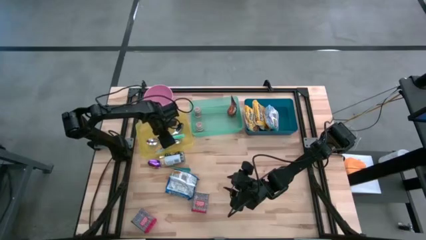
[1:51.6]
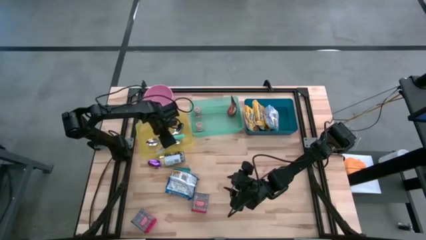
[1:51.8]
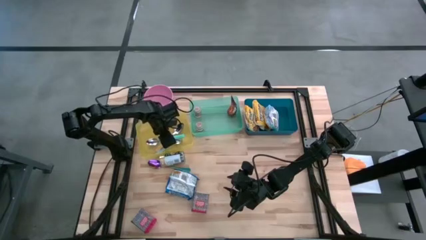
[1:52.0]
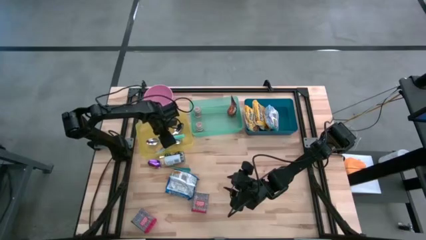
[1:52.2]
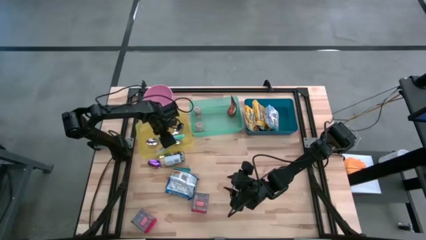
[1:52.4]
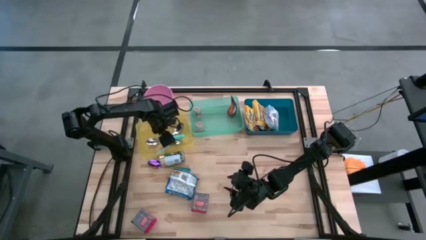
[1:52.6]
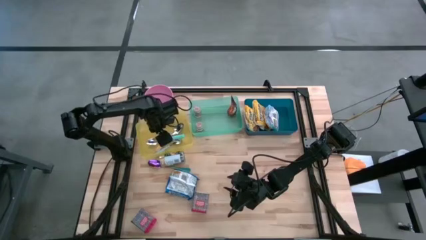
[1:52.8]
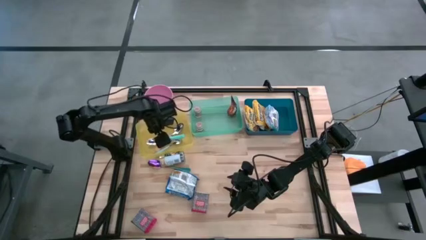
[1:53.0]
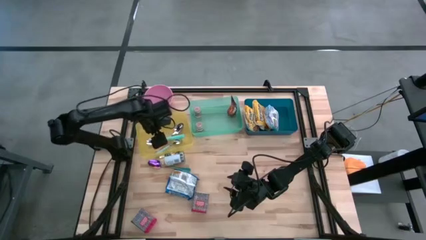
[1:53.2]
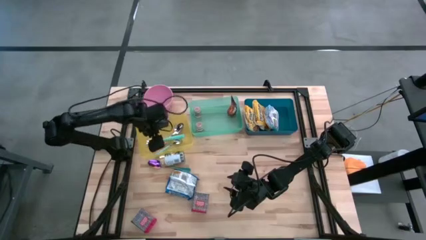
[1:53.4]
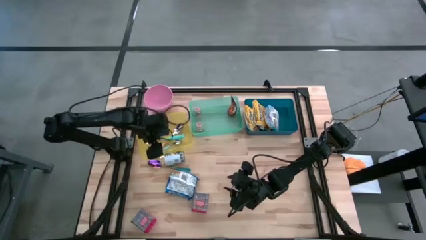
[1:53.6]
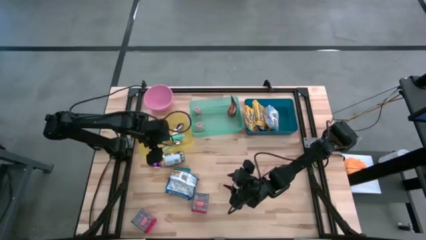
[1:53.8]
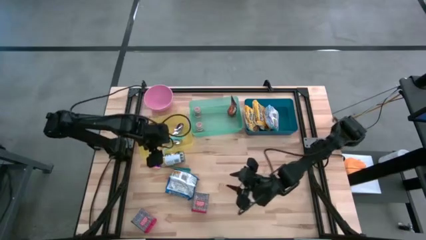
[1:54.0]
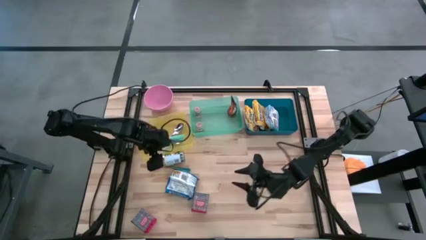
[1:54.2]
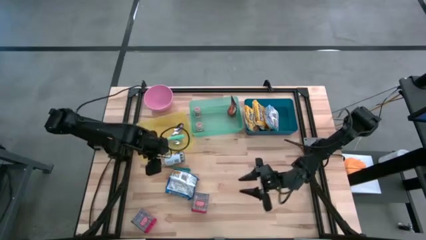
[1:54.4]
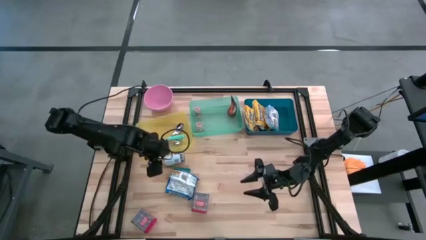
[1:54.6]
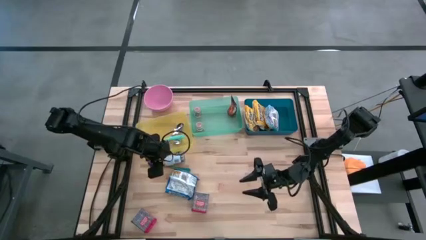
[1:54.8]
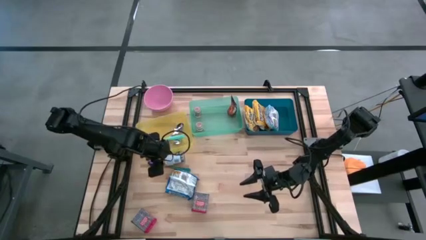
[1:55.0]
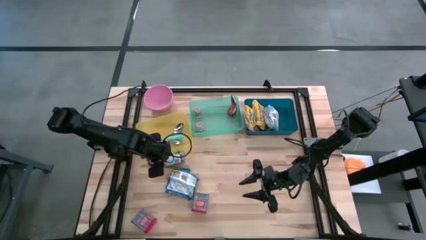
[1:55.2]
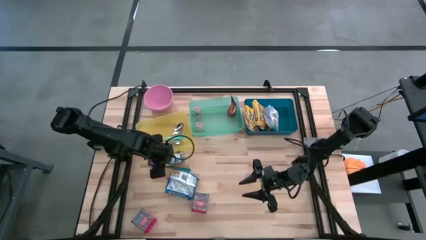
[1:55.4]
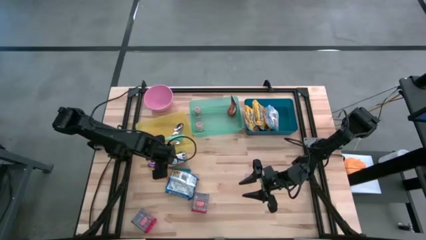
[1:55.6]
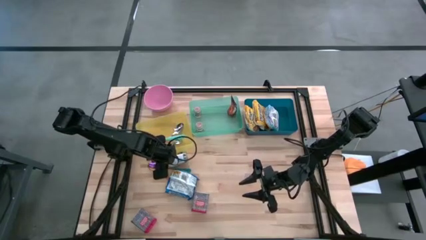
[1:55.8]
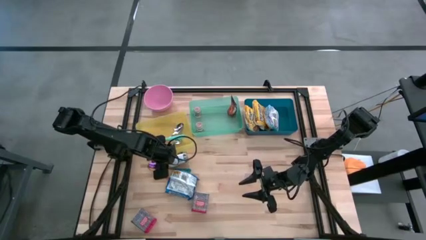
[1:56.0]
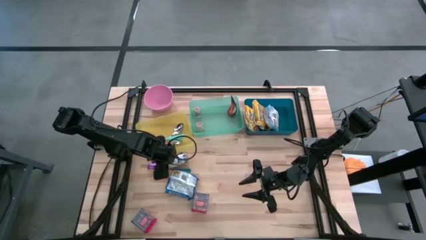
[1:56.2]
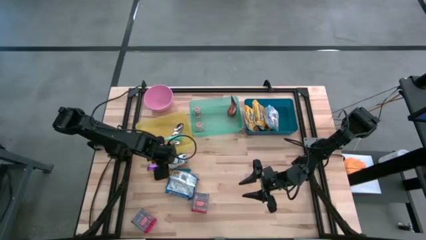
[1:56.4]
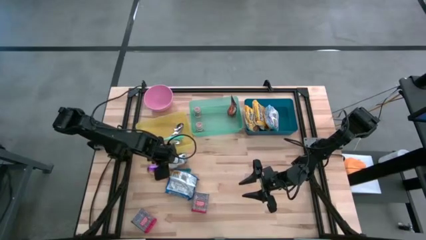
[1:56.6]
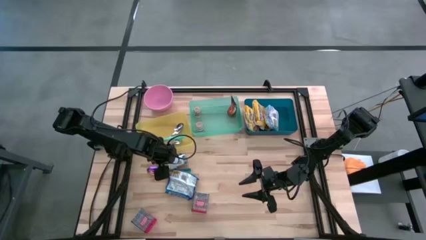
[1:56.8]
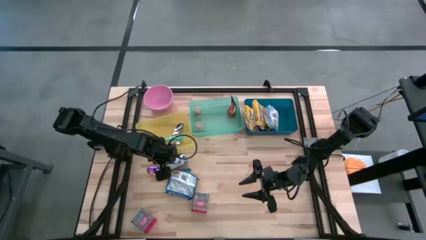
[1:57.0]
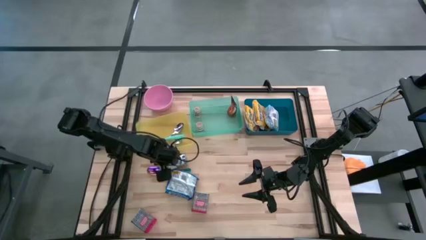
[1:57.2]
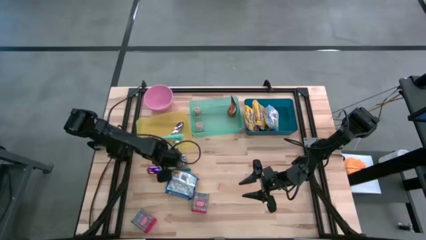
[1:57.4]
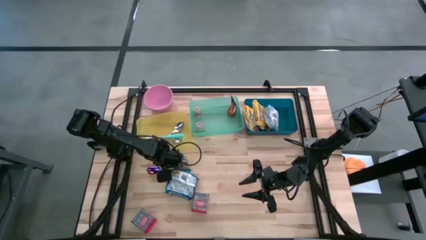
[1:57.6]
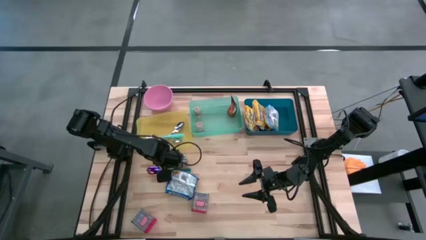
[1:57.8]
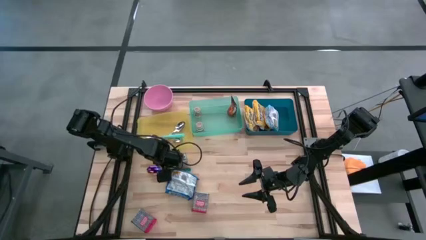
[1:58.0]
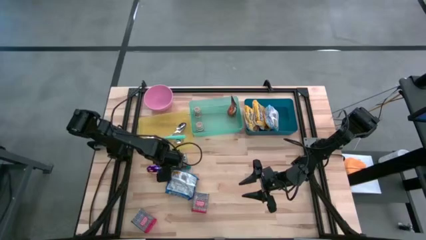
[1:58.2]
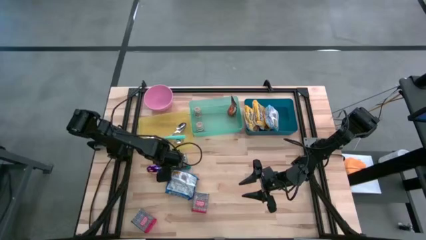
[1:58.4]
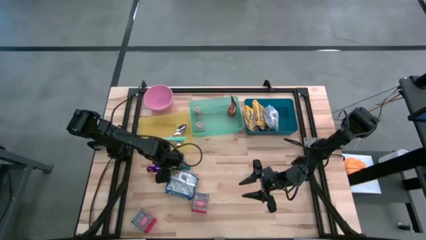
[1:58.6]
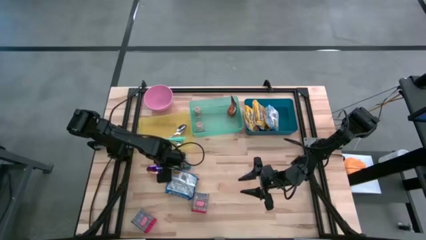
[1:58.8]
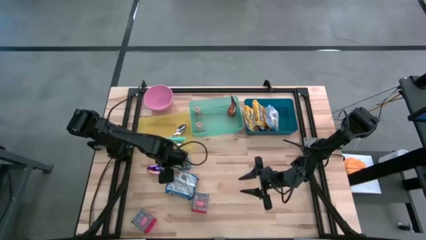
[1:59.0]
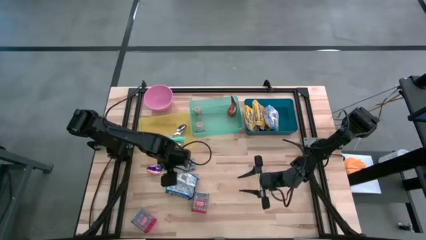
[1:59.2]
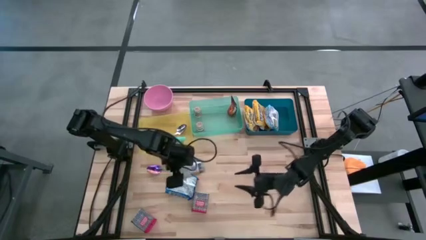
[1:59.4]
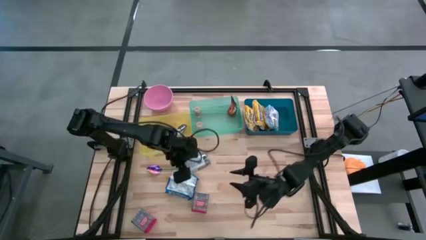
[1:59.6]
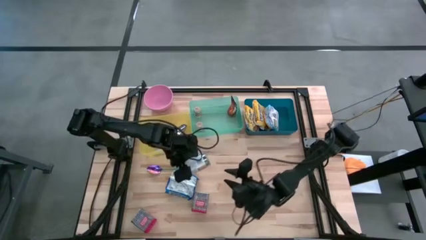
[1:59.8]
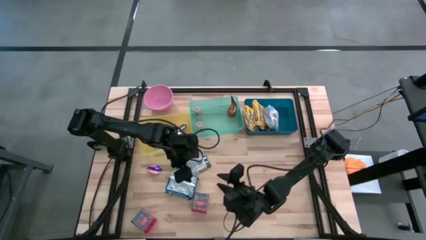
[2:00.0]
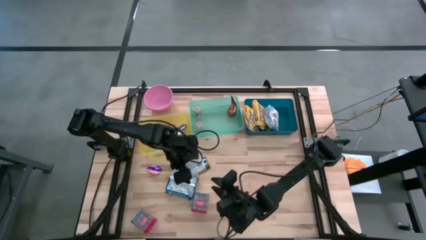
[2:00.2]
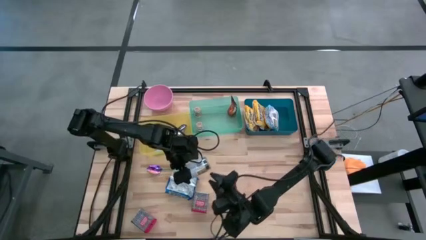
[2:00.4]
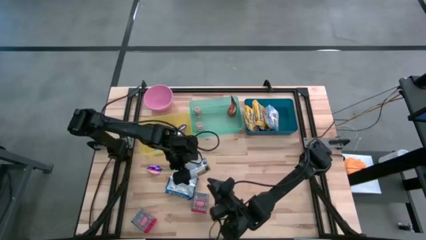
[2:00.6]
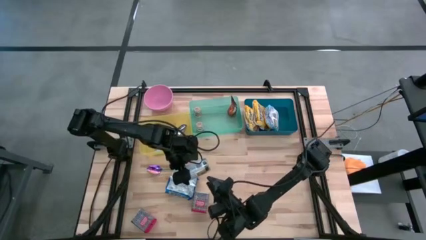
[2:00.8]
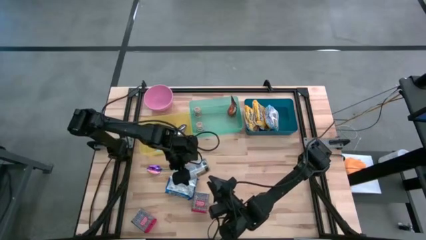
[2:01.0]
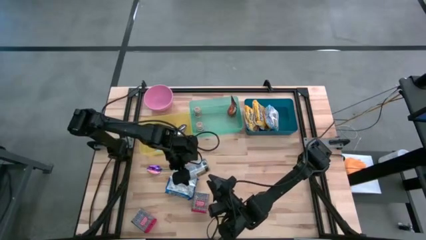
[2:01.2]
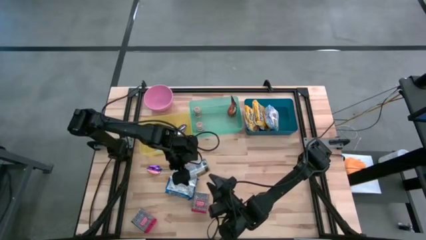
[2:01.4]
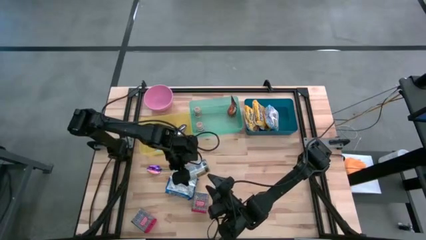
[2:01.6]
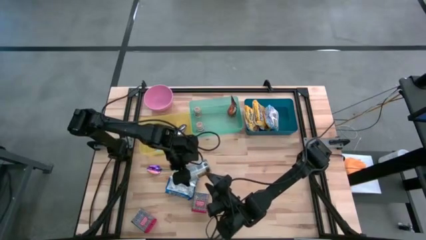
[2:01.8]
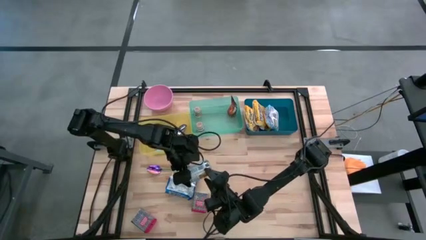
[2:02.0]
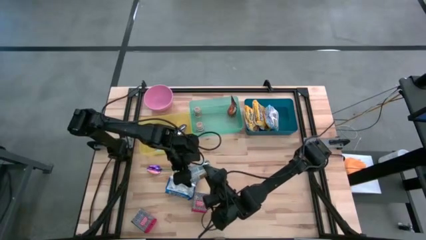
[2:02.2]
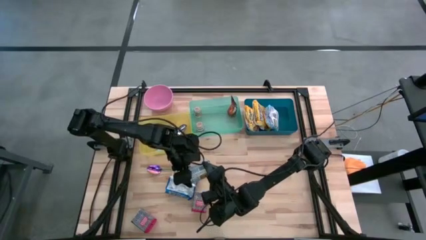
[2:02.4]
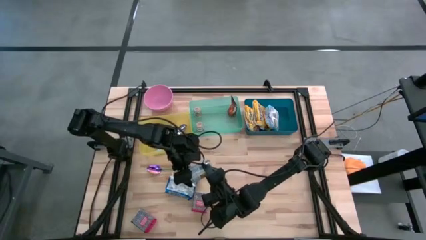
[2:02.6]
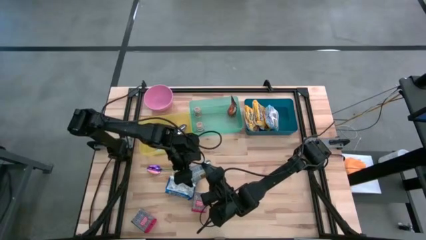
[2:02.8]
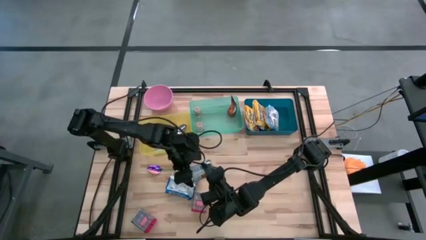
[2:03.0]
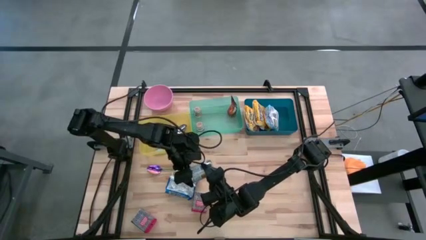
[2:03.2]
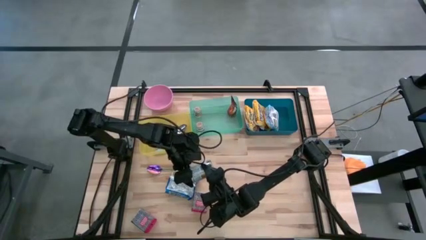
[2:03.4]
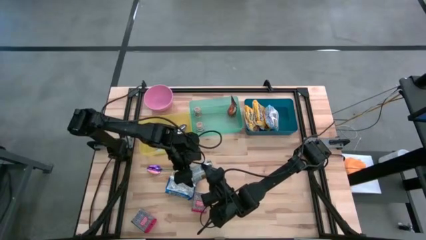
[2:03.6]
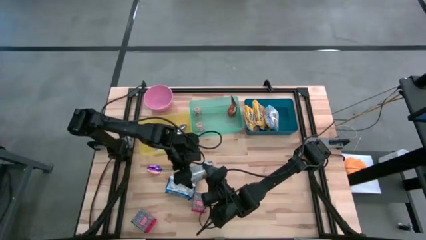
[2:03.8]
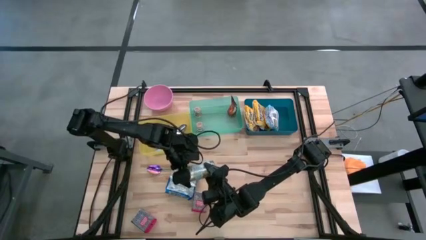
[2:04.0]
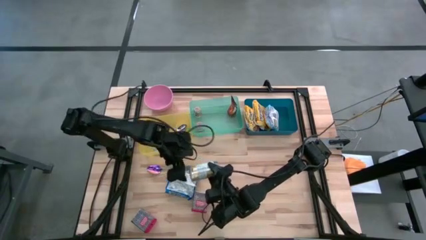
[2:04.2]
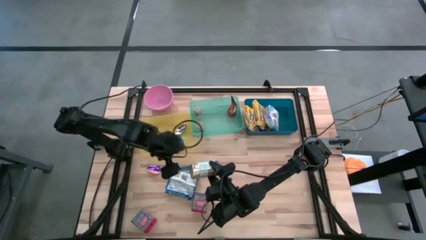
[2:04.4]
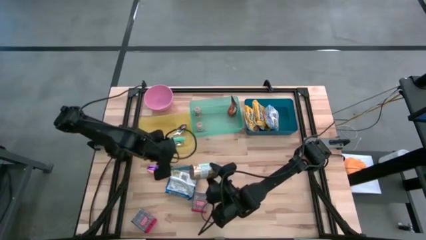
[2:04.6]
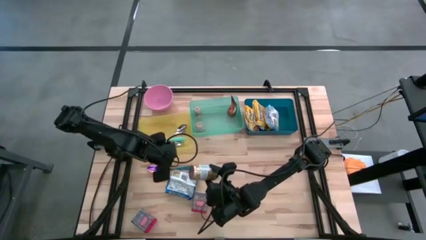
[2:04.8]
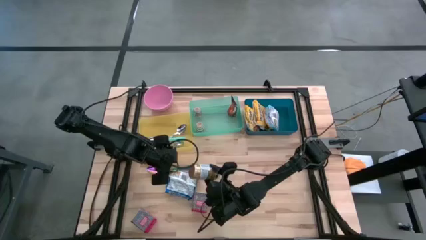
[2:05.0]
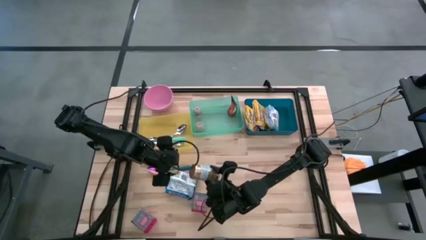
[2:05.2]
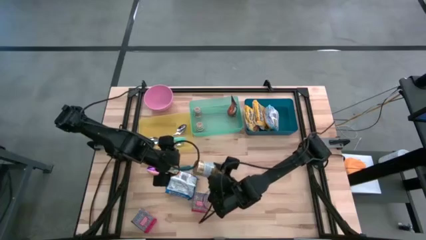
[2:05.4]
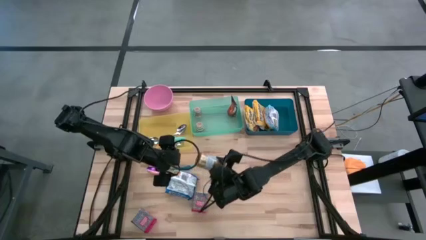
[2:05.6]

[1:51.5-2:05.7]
Put the golden seasoning bottle into the green bin
